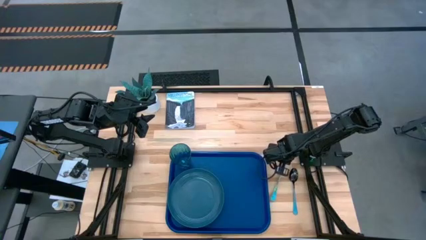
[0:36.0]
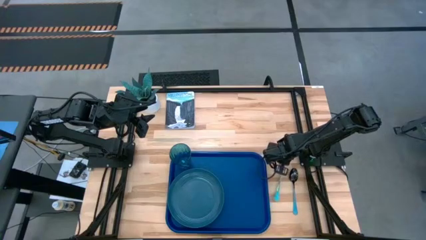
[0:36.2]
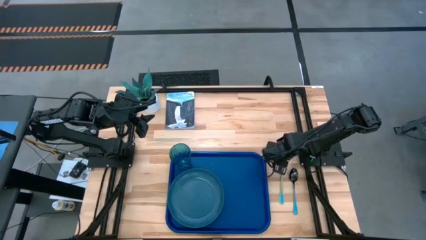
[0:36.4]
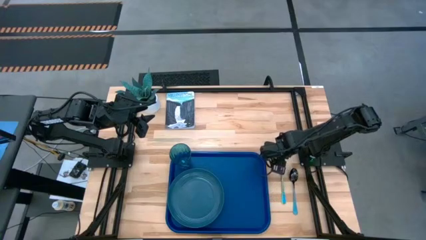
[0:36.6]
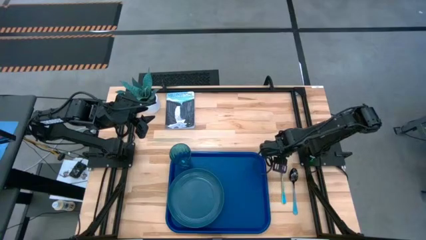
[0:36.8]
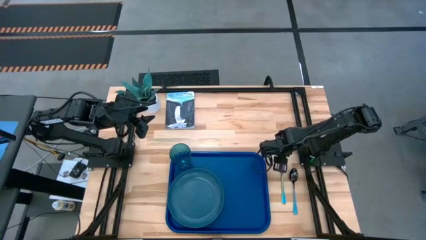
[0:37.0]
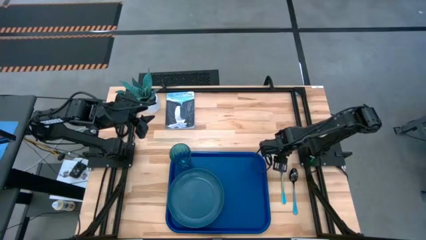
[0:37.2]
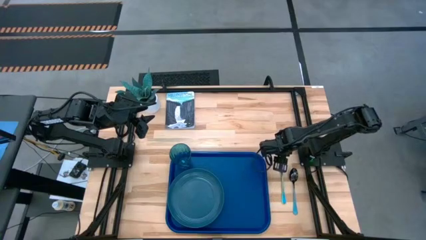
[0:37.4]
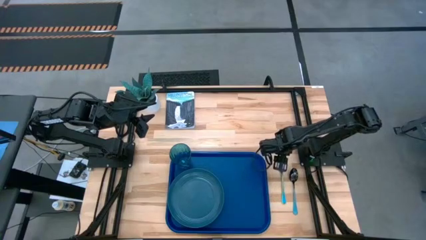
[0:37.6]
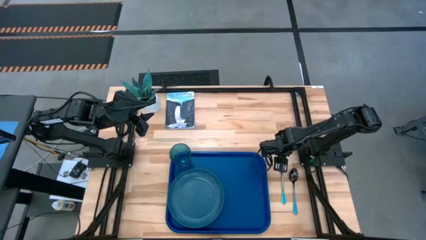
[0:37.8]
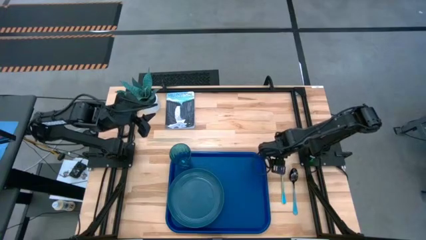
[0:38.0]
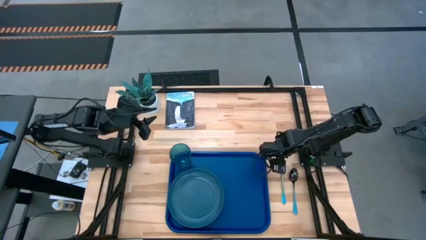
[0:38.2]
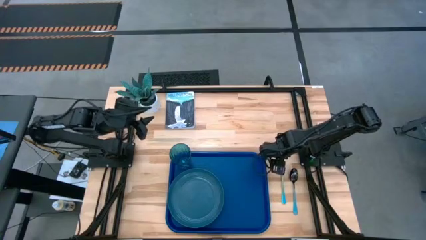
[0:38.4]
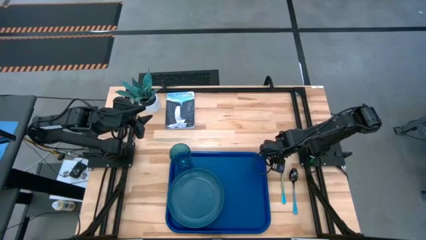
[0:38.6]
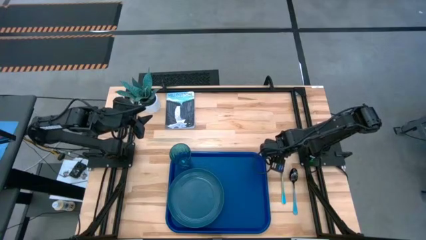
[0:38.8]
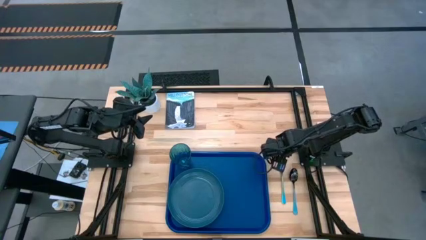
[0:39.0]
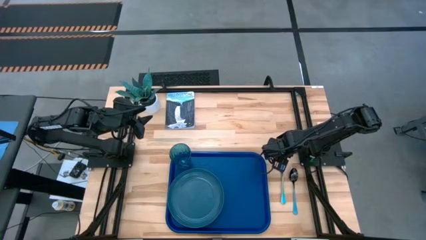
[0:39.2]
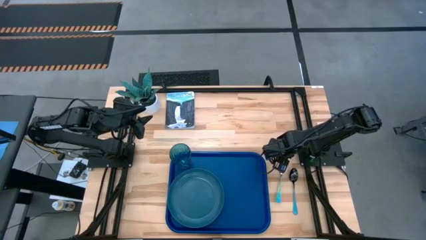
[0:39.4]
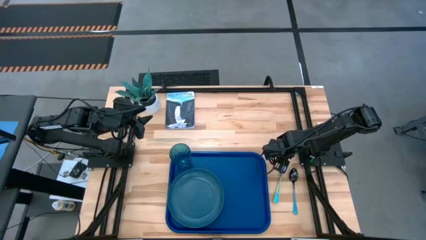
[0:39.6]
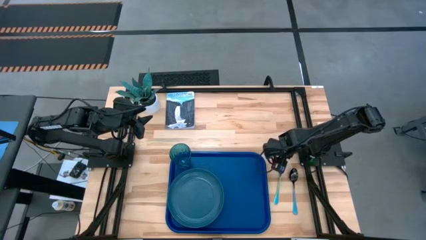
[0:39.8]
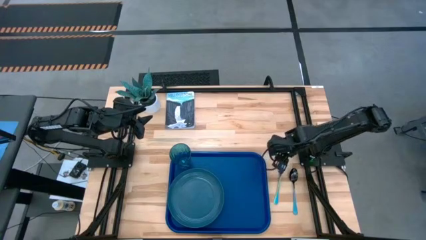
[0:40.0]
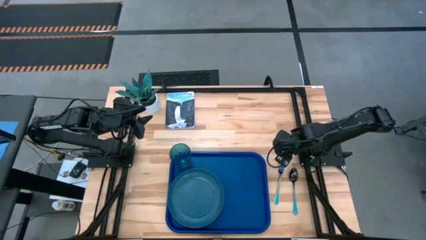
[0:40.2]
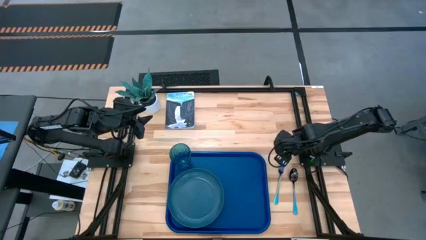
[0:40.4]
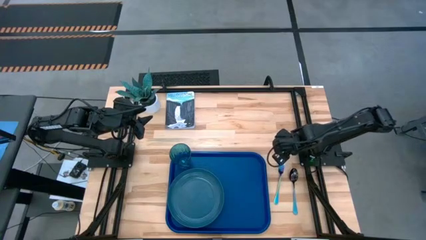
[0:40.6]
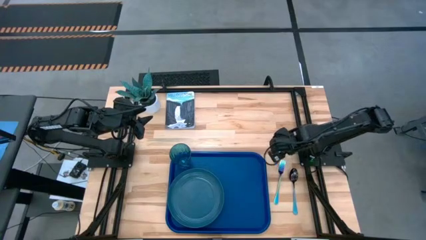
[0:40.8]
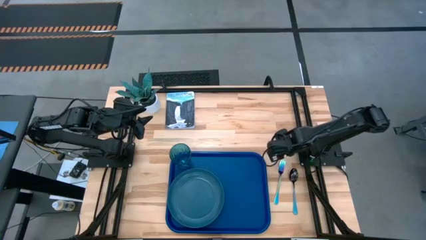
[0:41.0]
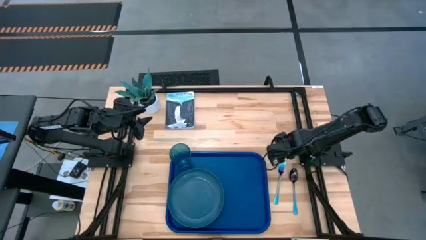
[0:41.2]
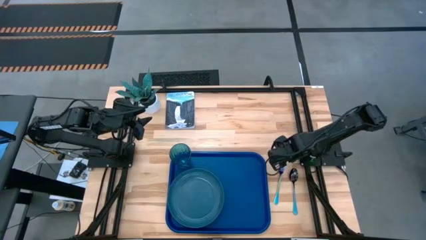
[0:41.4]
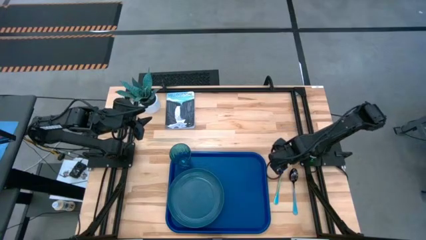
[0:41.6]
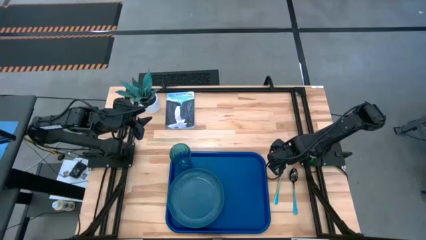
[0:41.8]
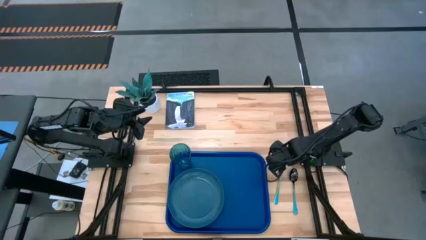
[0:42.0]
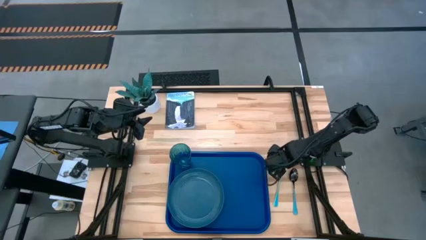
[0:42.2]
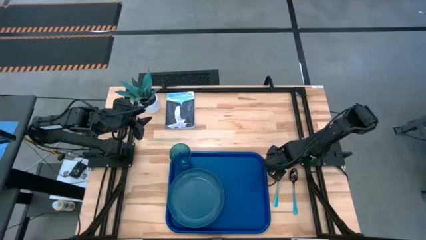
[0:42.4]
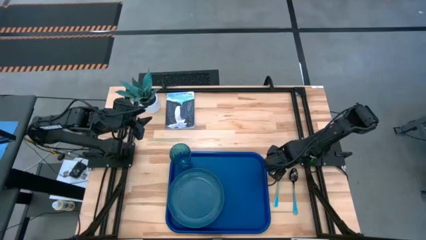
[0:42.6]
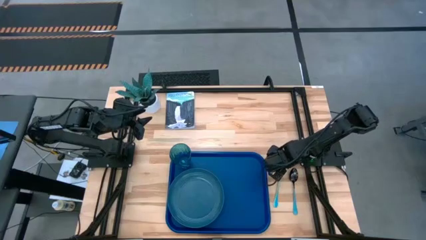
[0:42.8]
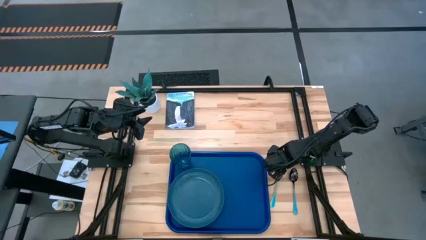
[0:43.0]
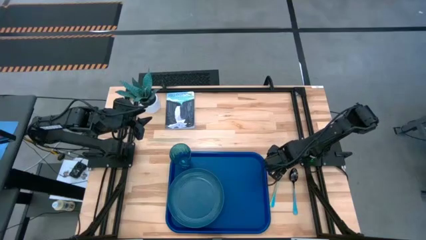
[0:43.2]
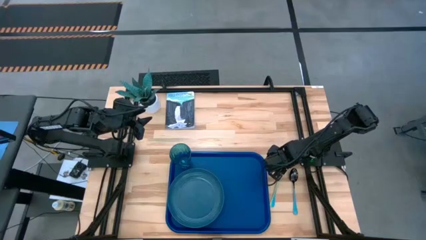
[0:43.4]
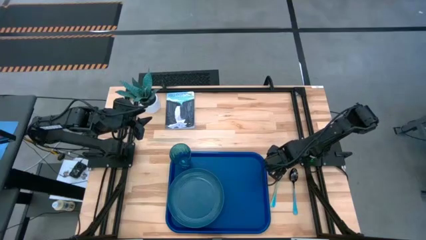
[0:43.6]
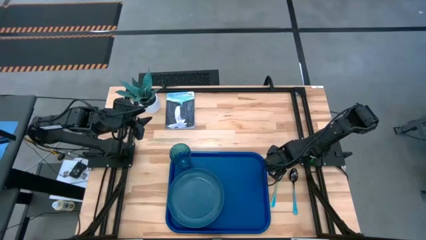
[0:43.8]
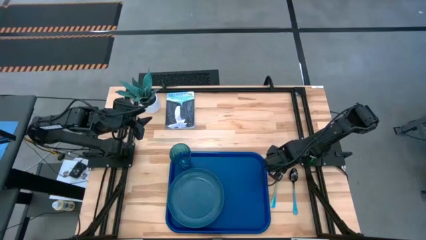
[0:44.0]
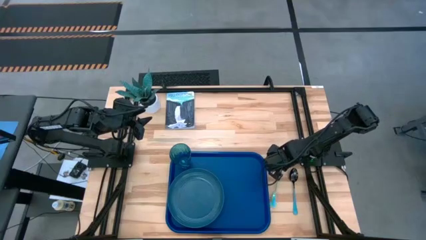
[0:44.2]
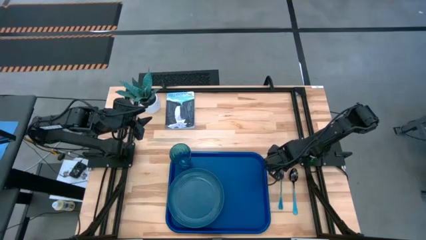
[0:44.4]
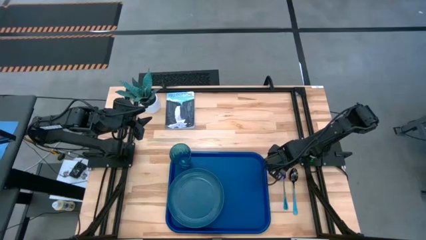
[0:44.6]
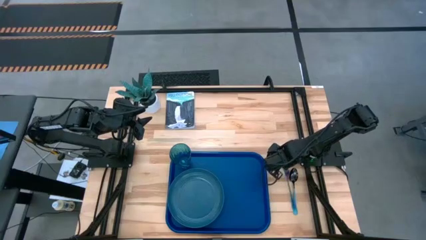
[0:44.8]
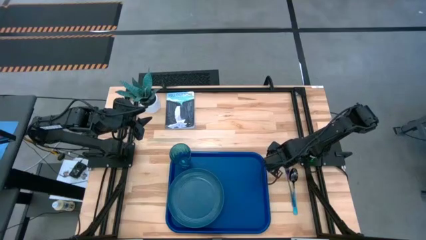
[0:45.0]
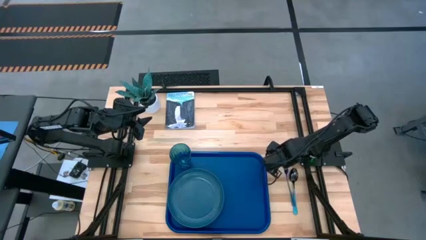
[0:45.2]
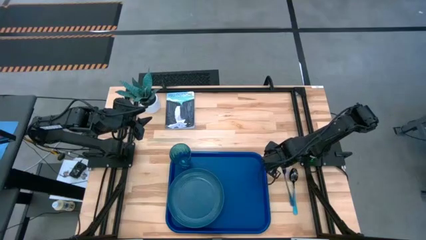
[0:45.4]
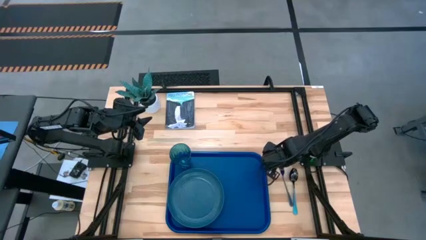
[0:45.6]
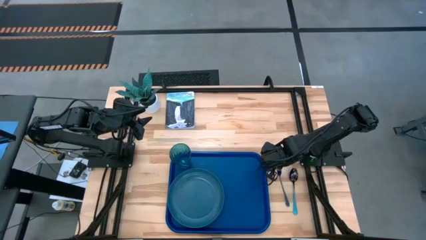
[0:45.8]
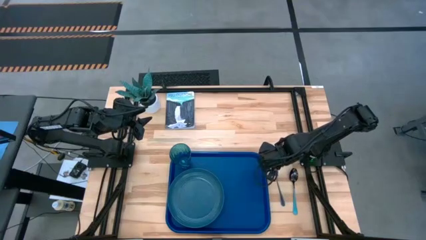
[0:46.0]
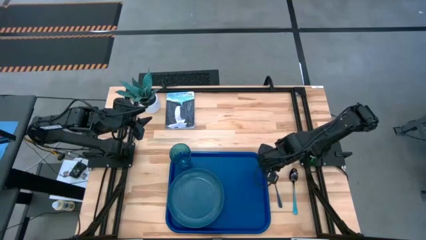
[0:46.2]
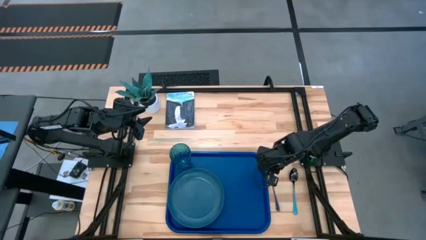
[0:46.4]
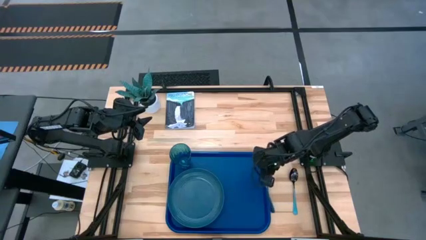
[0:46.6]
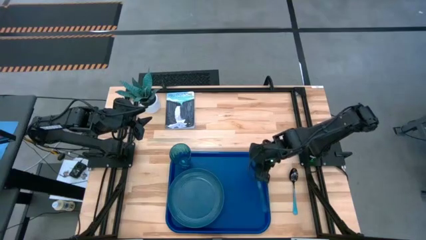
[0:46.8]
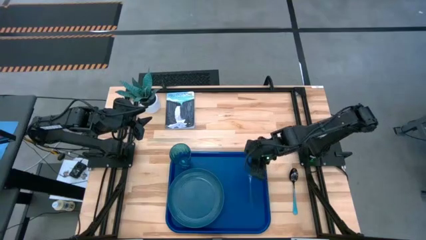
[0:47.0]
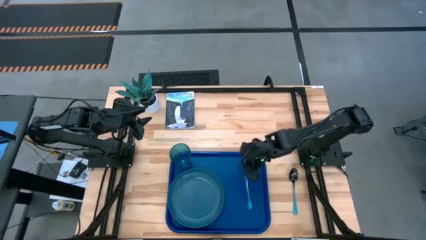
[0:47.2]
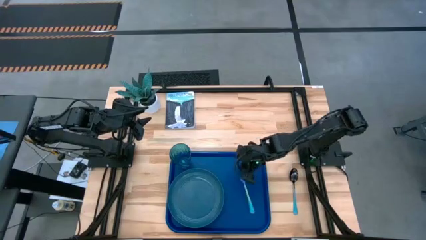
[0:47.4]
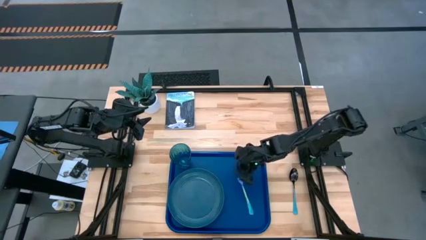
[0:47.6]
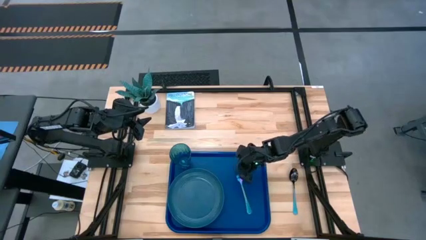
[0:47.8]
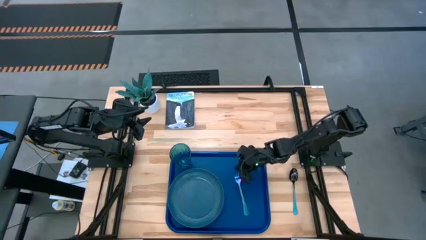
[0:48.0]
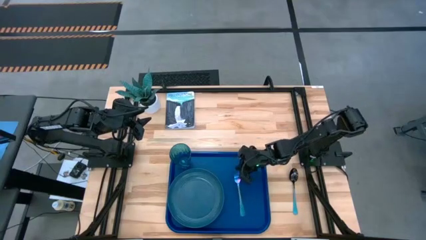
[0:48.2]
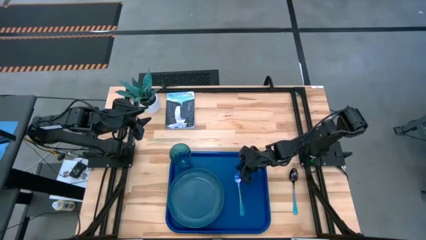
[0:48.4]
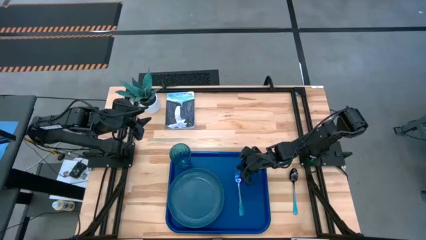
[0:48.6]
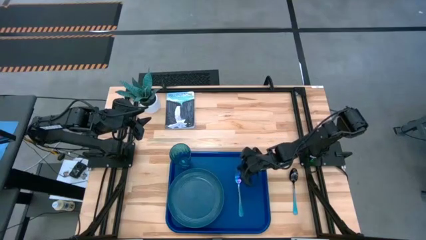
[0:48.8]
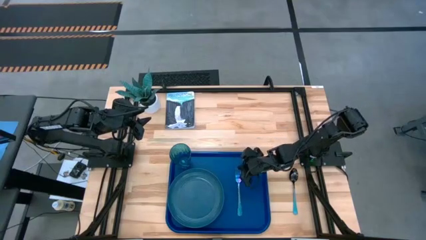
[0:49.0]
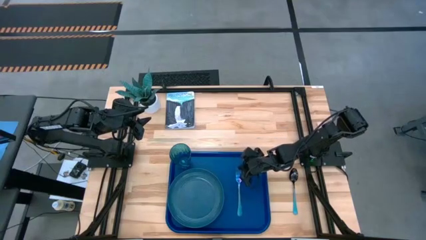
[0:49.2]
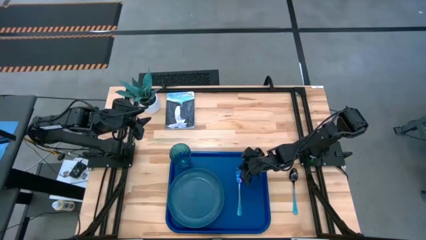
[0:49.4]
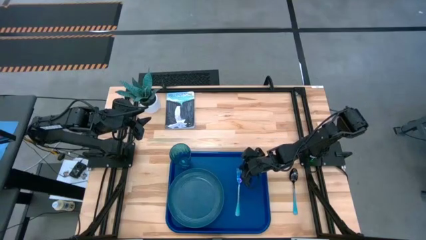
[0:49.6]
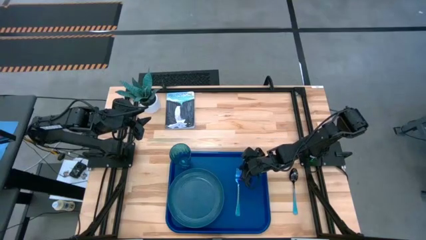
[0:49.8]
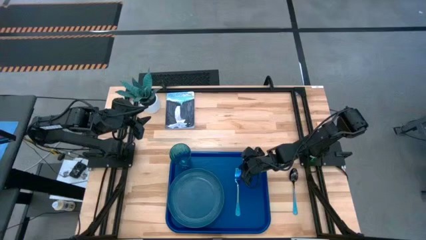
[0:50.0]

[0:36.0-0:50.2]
Task: Pick and place plate/cup/fork/spoon on tray
Put the blue fork on the blue serving tray to the right of the blue plate
